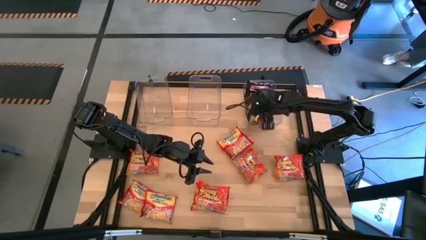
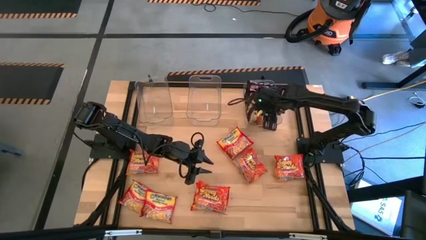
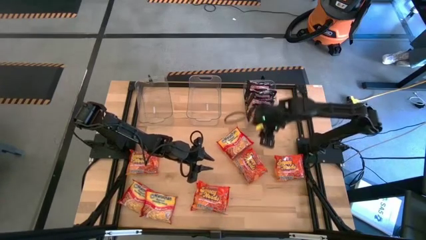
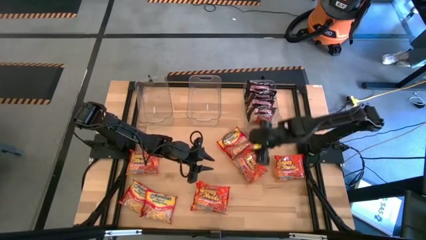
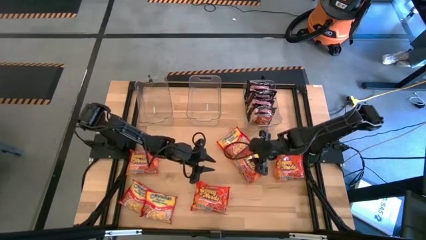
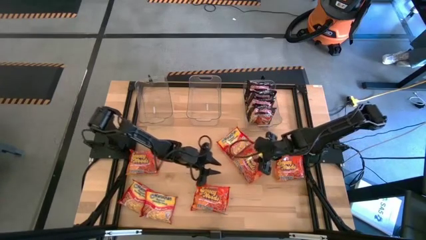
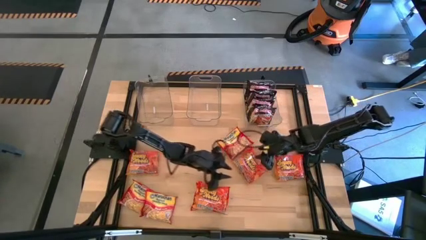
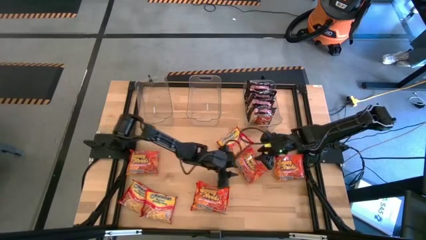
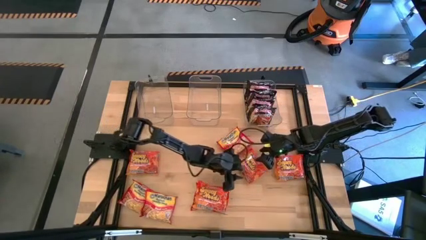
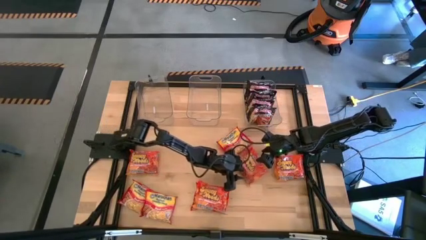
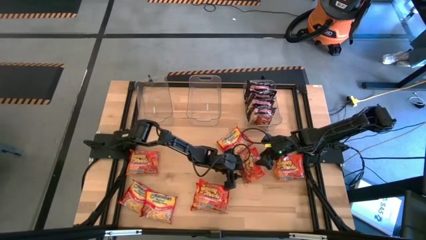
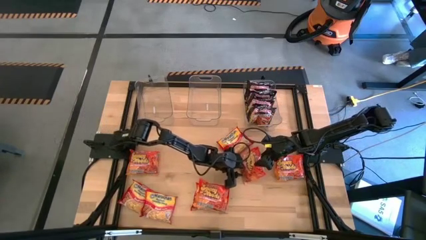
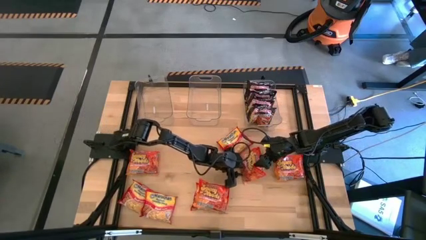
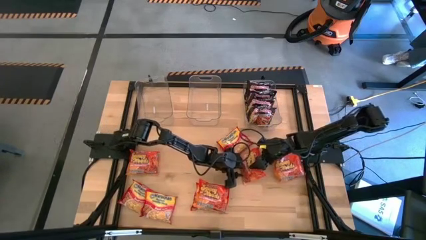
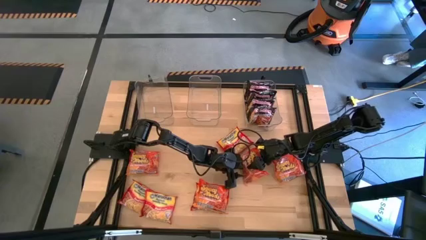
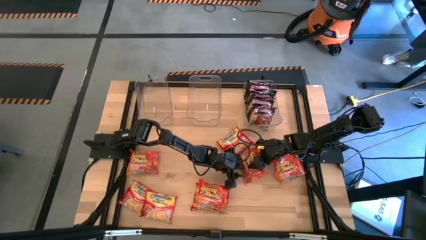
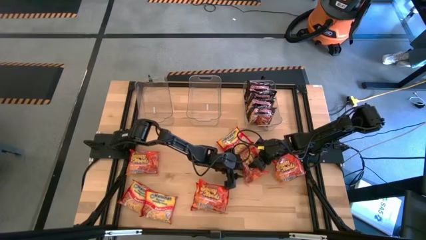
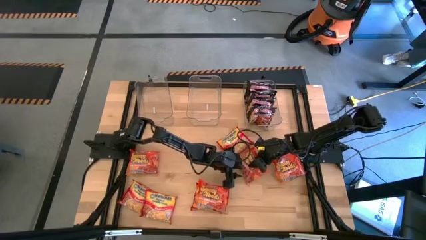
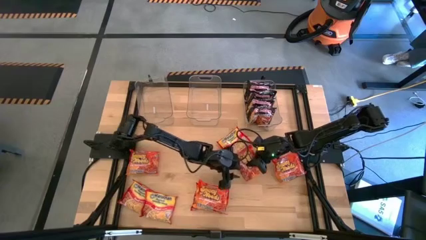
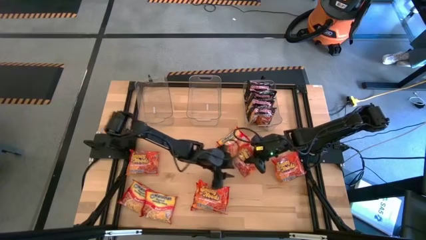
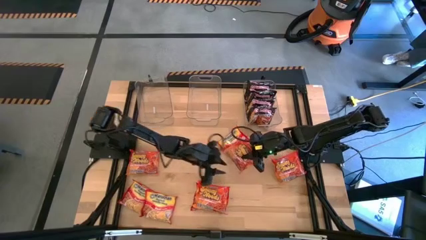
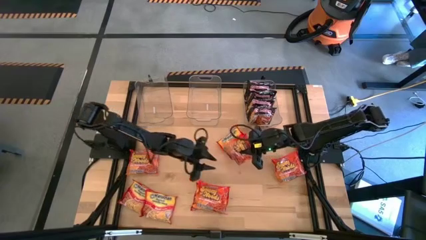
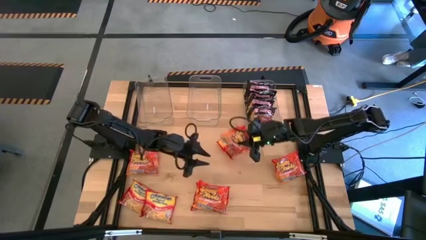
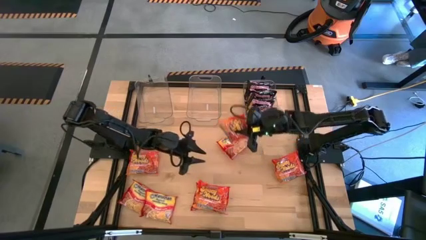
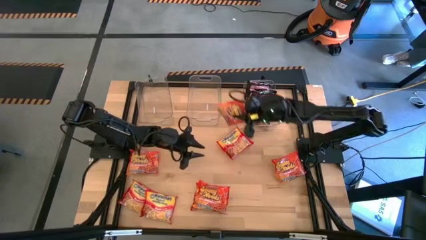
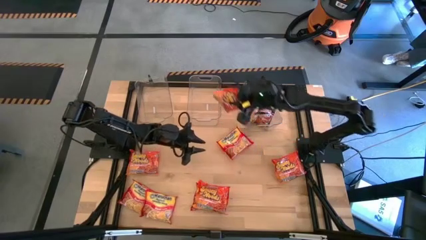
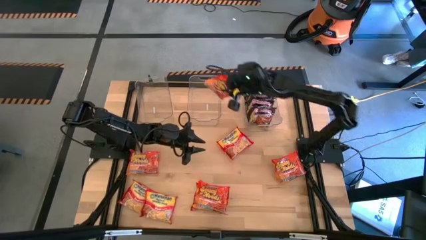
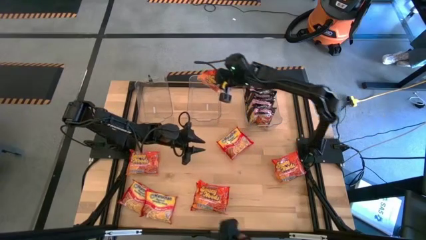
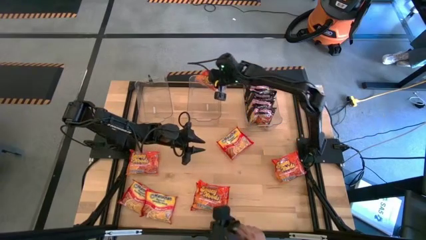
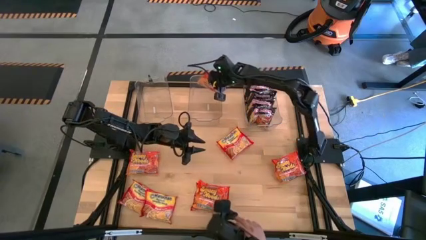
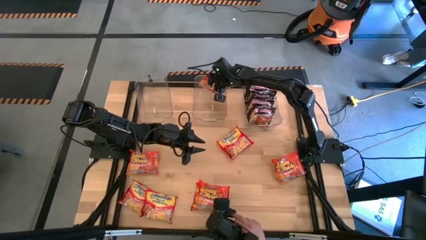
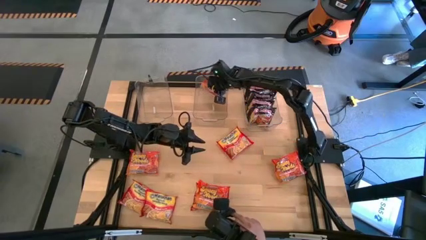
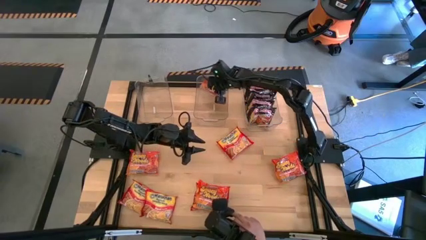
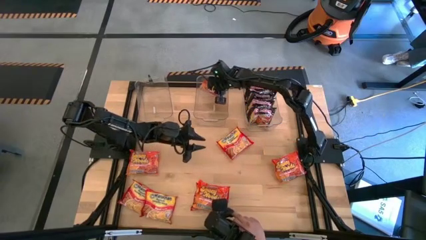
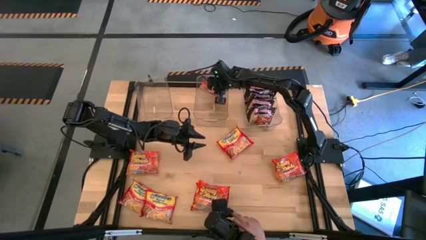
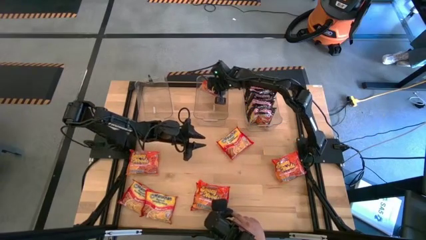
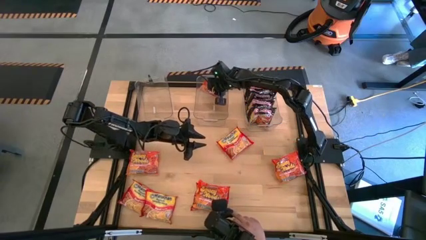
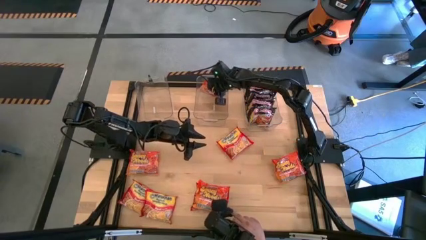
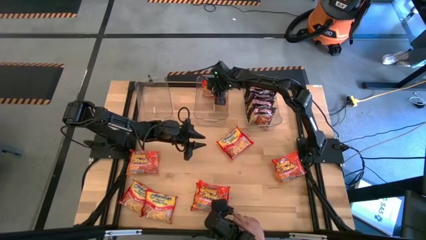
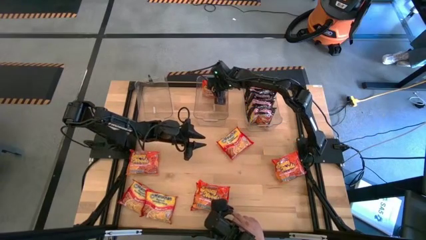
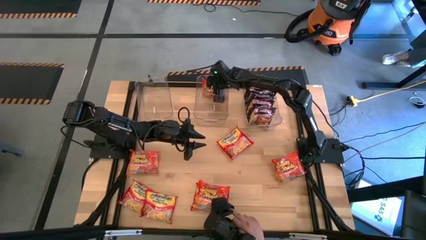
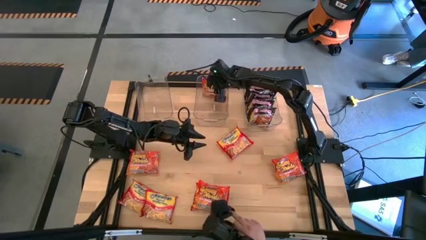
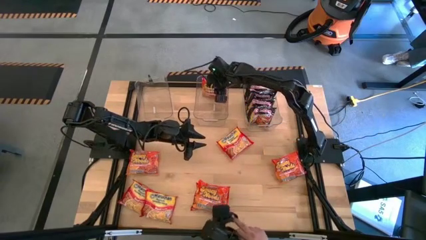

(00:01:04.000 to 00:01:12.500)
Task: Sort Maruchan noodles
Put the orange noodle pack into the middle transparent bin

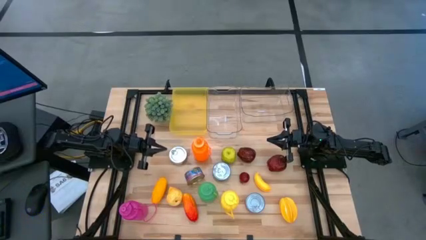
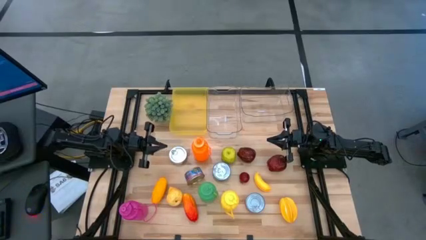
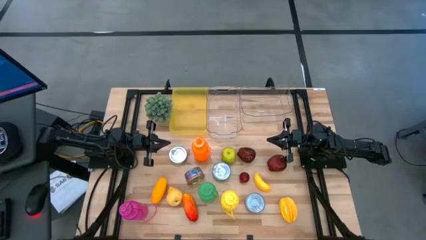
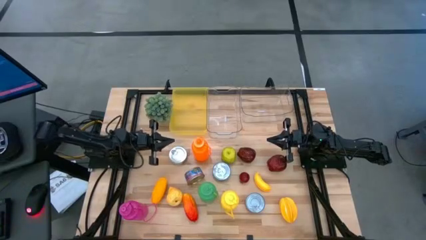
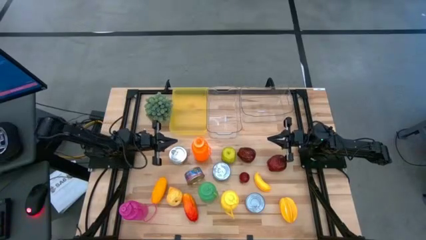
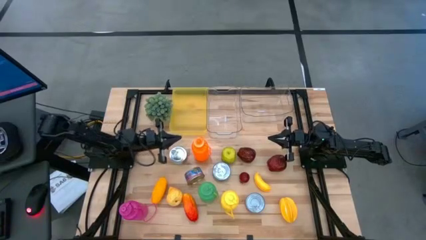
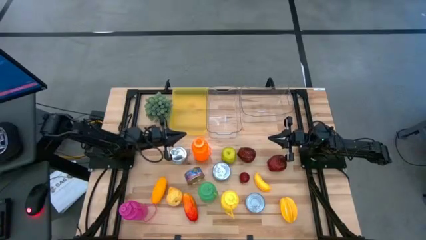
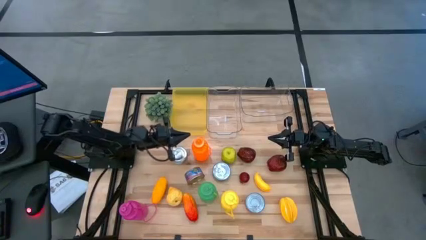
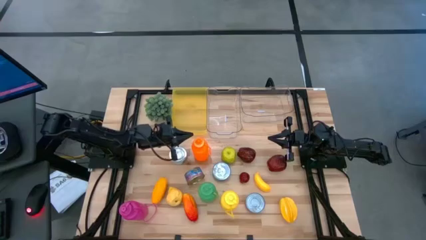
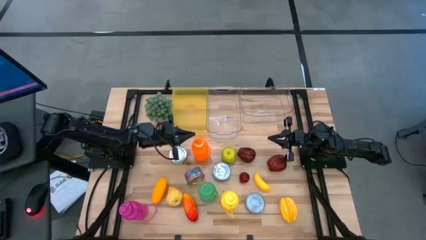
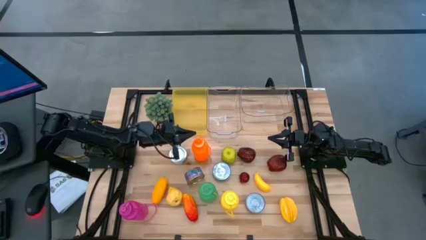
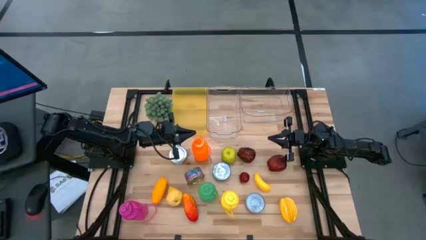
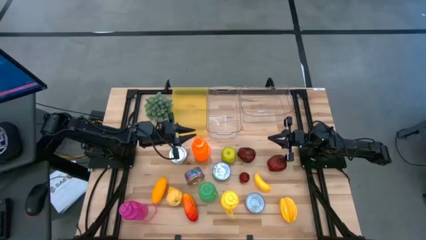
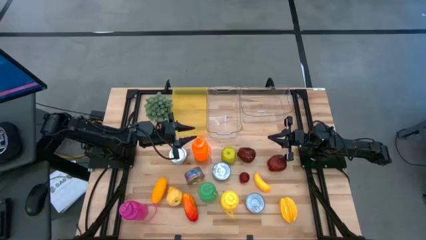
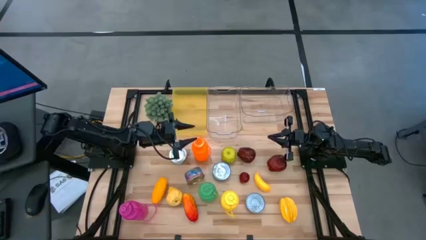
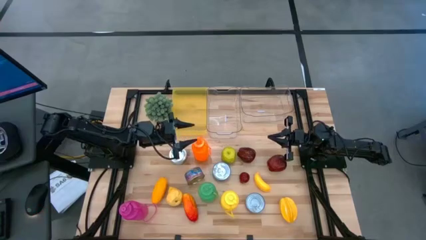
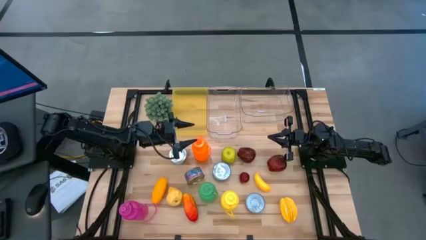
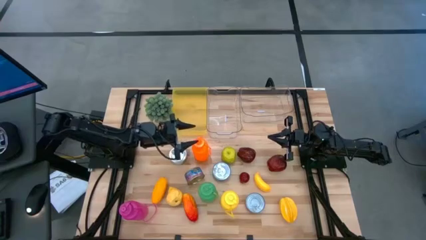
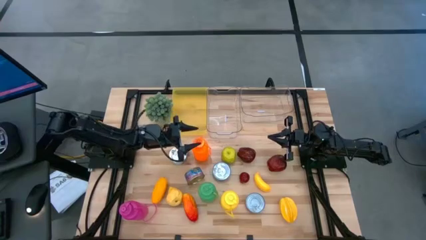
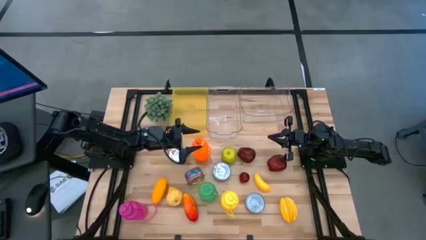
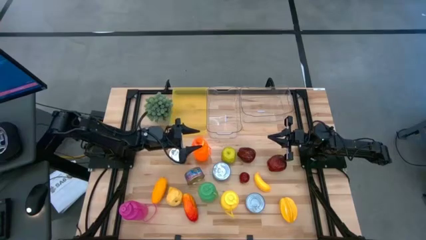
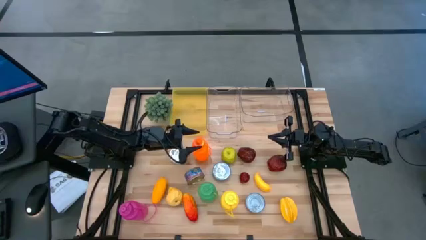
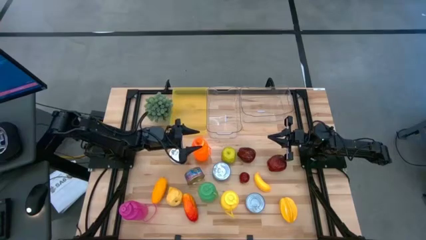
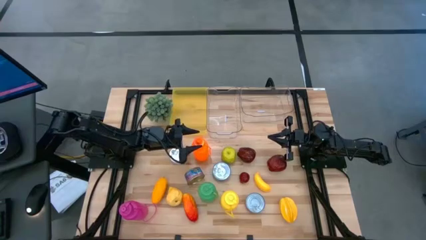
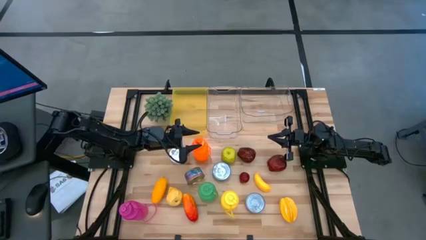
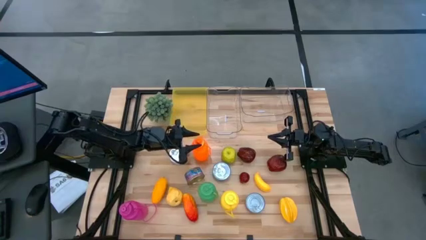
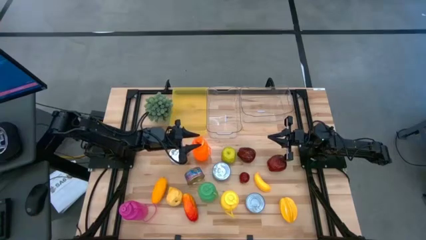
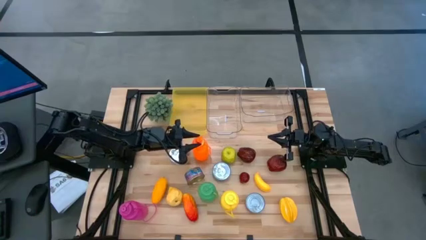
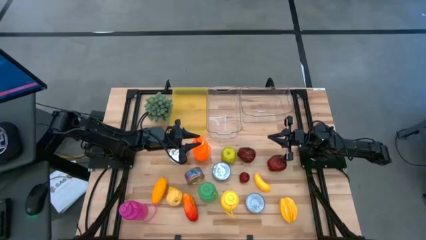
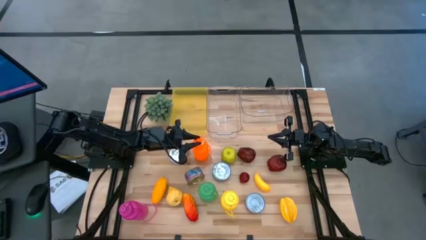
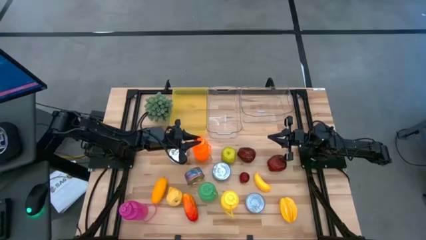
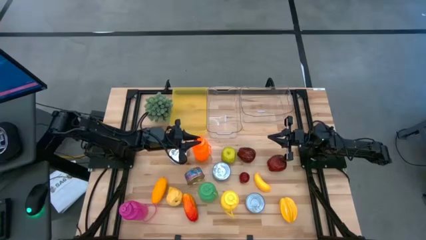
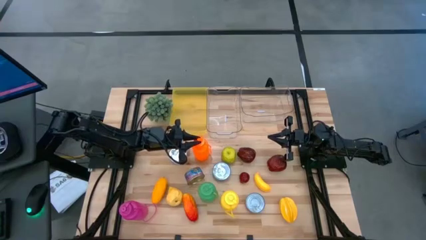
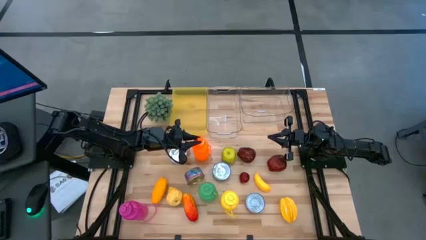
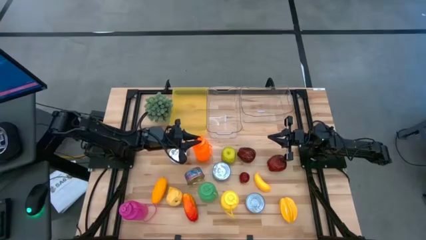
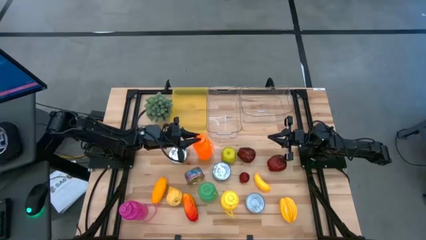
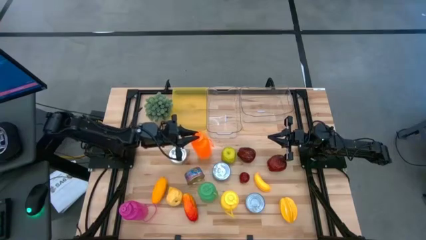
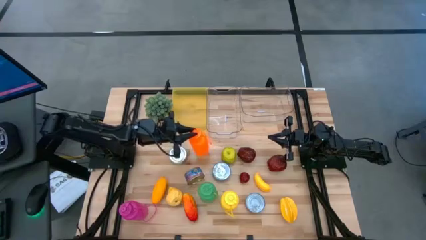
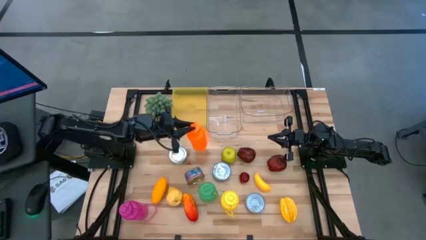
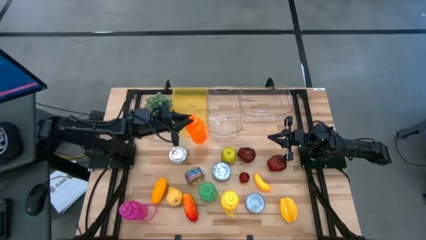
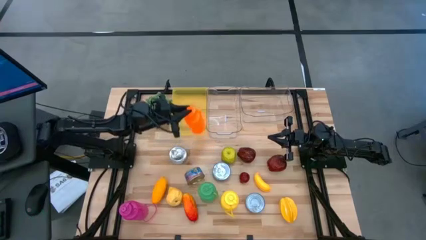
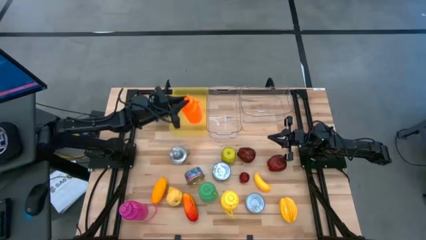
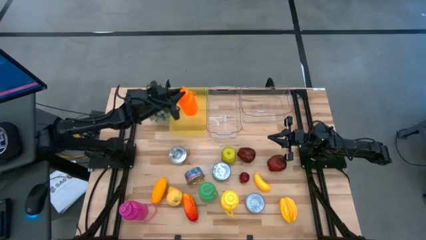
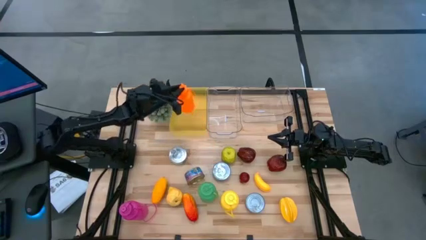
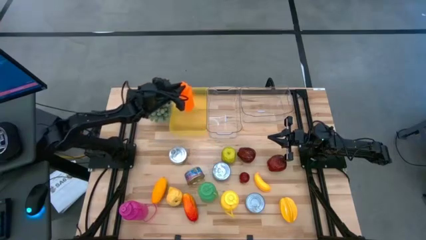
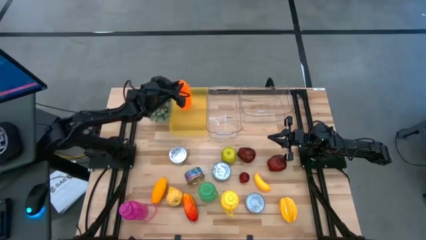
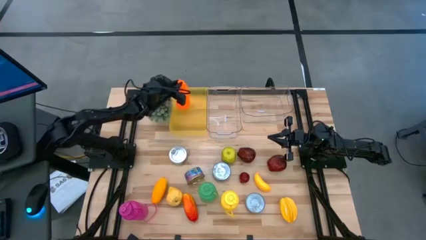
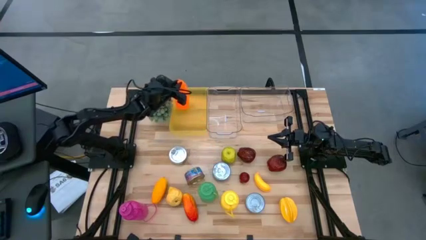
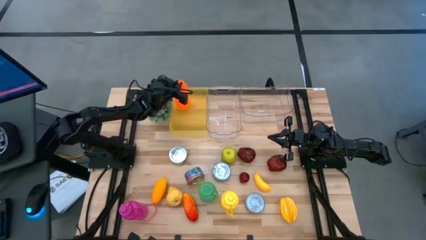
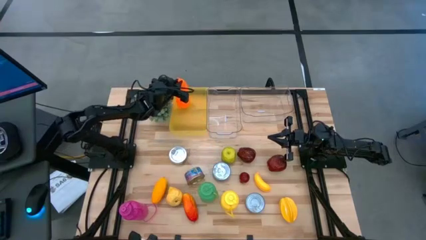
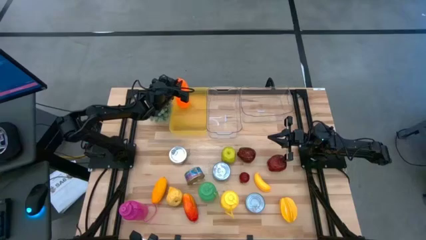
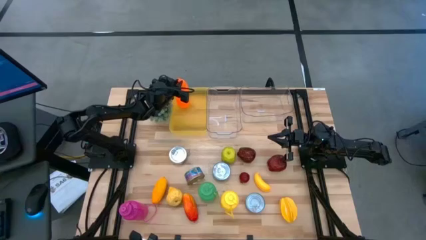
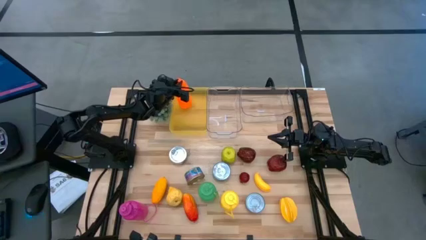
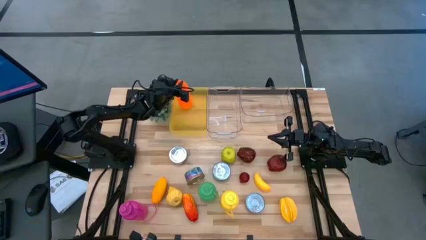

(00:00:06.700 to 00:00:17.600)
Task: Pick & Place Food Item
Put the orange bottle into the yellow bin
